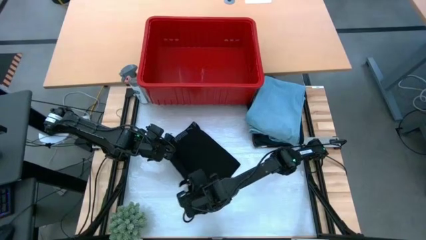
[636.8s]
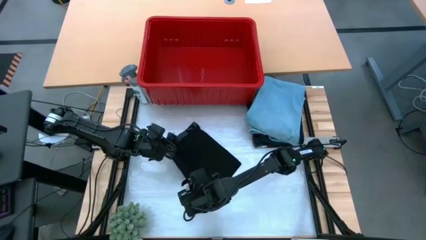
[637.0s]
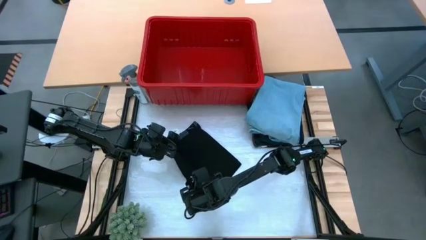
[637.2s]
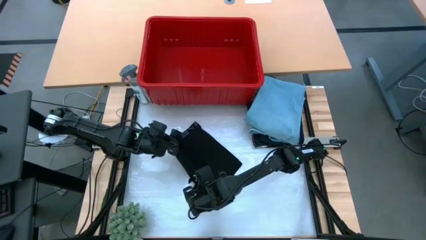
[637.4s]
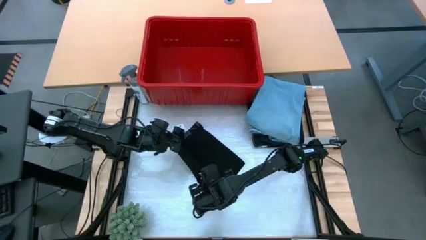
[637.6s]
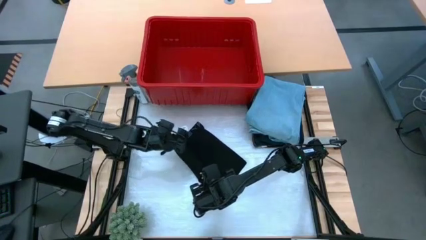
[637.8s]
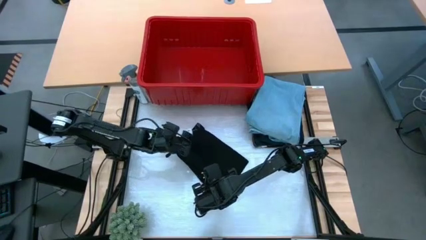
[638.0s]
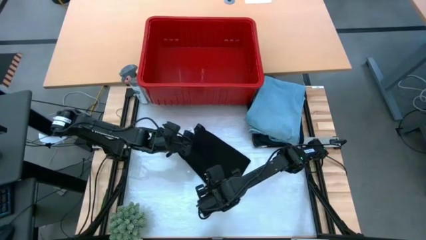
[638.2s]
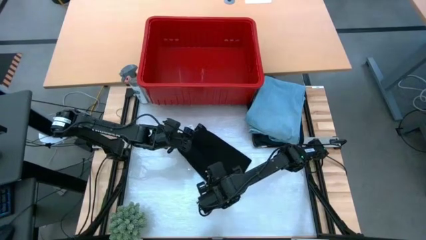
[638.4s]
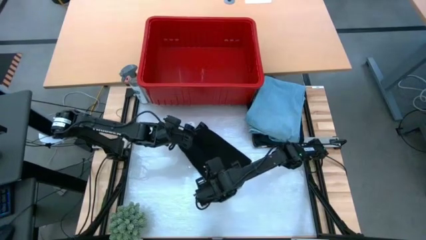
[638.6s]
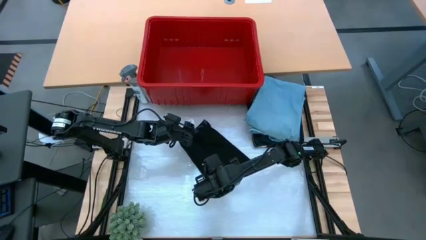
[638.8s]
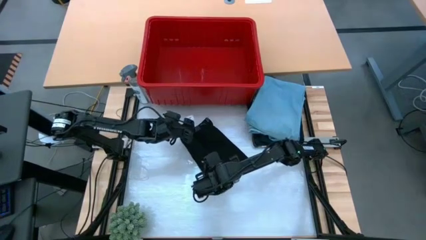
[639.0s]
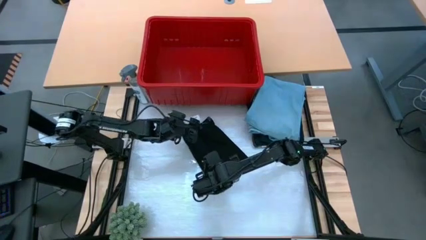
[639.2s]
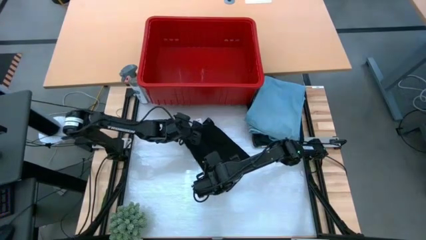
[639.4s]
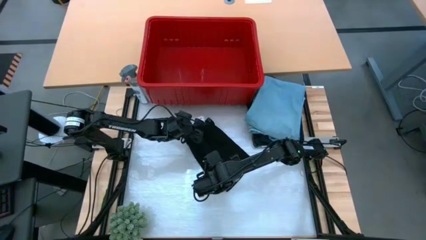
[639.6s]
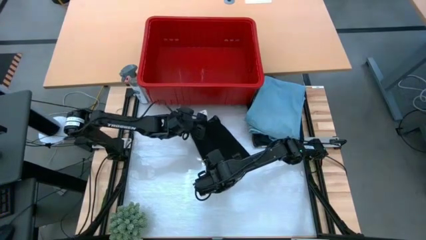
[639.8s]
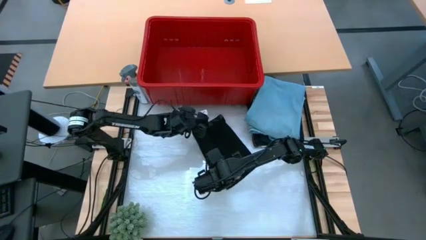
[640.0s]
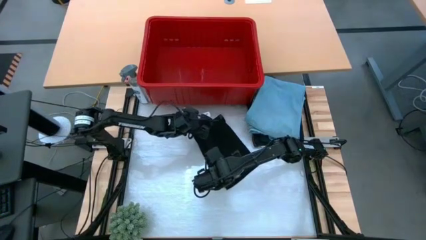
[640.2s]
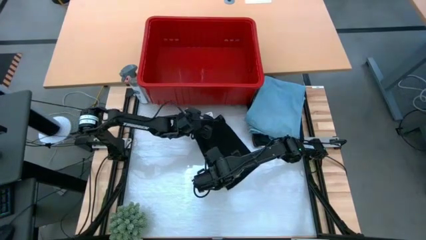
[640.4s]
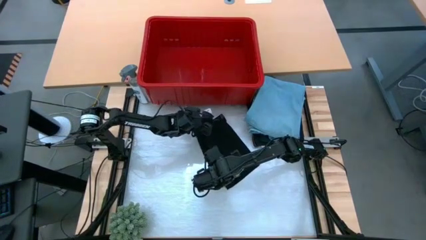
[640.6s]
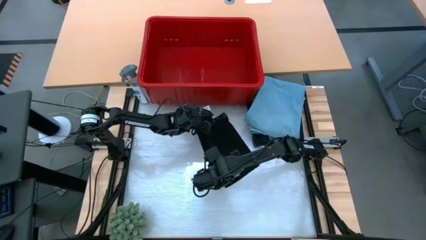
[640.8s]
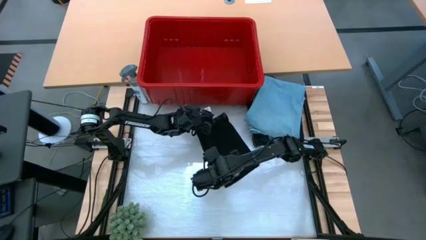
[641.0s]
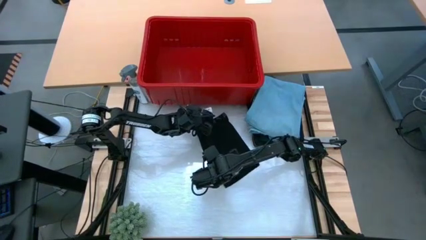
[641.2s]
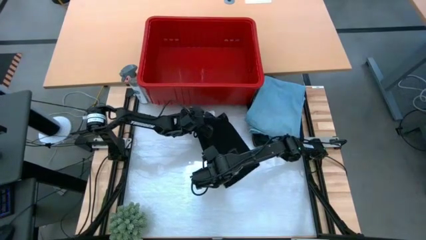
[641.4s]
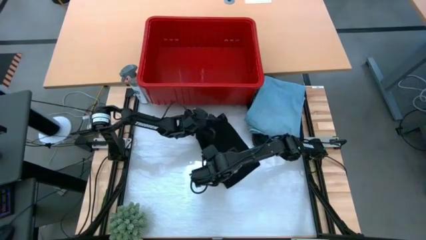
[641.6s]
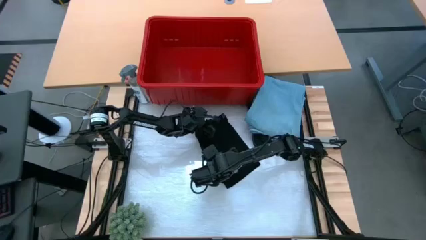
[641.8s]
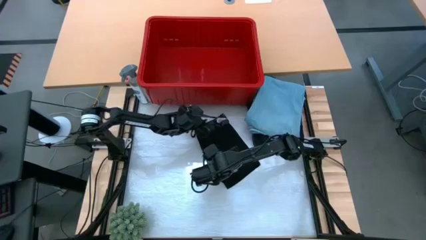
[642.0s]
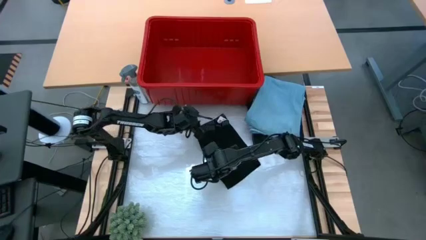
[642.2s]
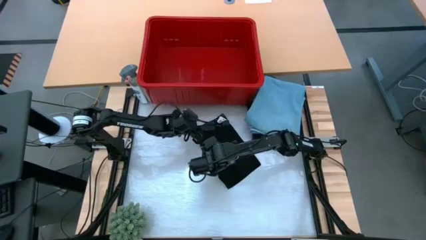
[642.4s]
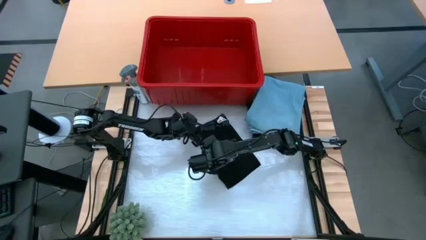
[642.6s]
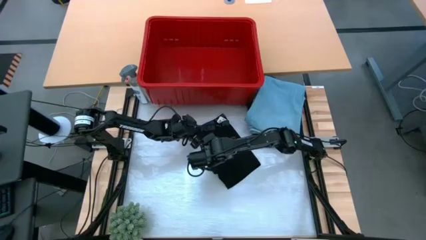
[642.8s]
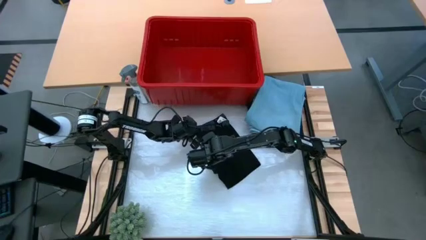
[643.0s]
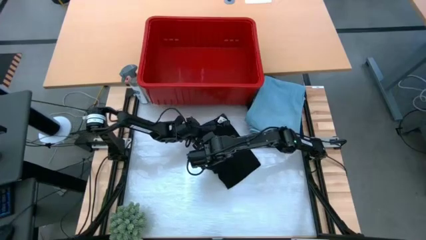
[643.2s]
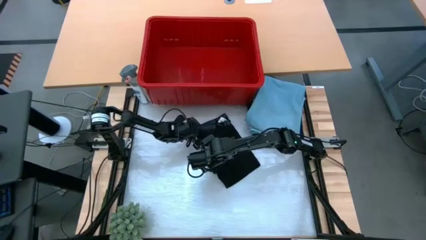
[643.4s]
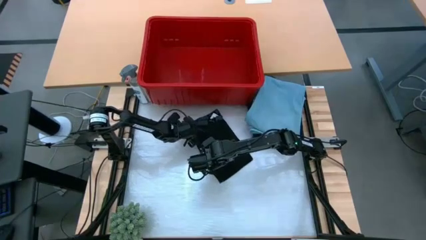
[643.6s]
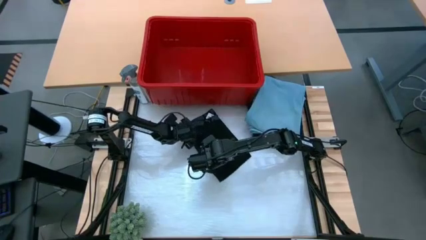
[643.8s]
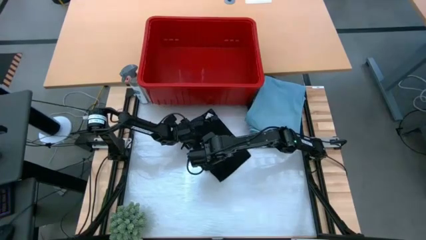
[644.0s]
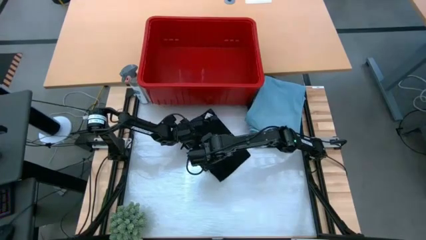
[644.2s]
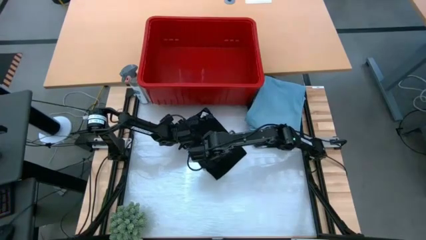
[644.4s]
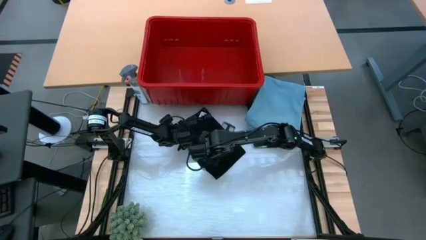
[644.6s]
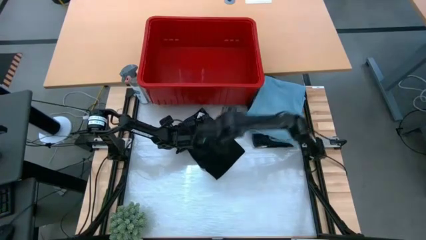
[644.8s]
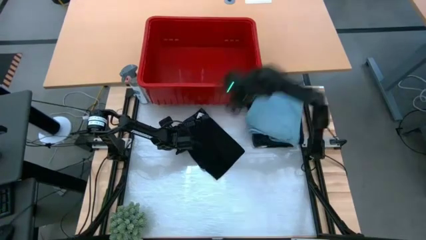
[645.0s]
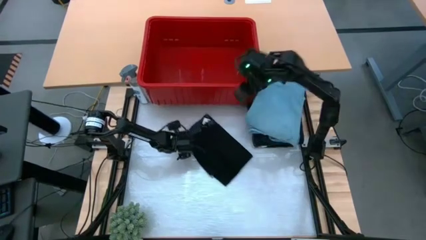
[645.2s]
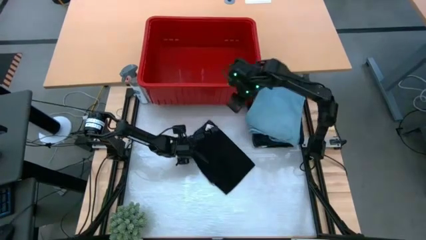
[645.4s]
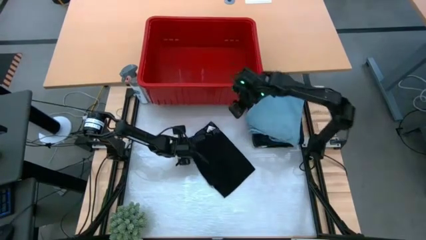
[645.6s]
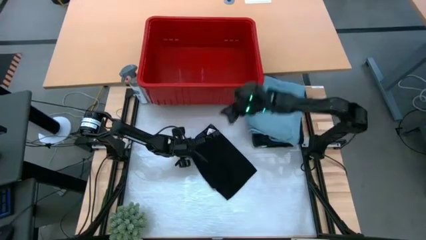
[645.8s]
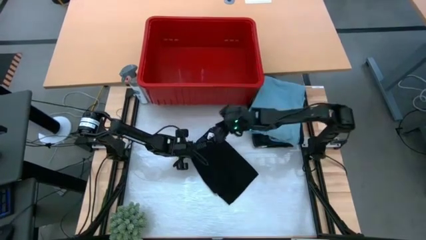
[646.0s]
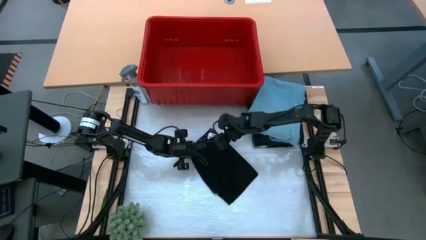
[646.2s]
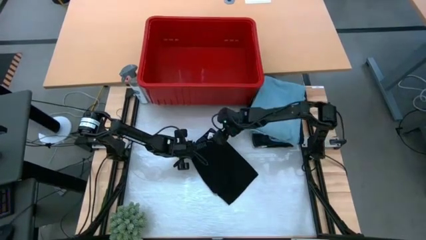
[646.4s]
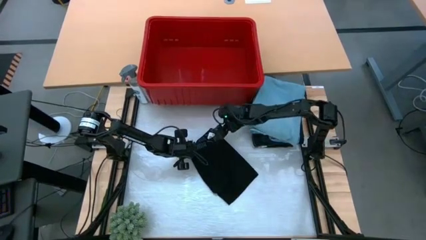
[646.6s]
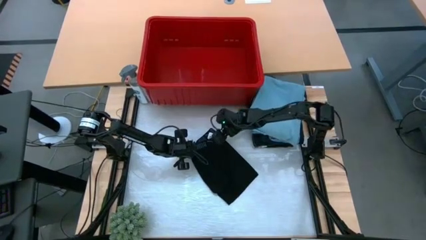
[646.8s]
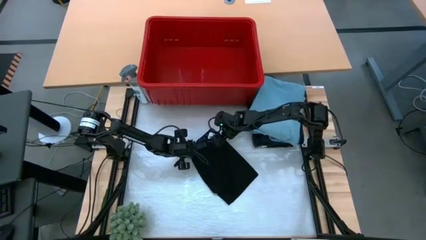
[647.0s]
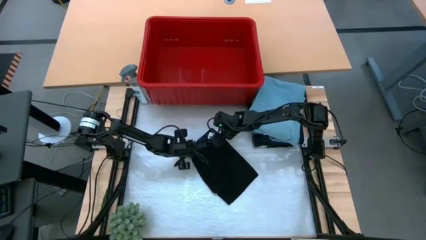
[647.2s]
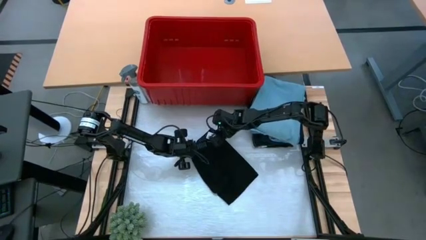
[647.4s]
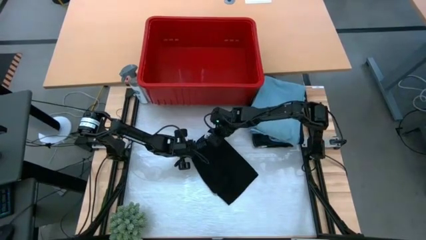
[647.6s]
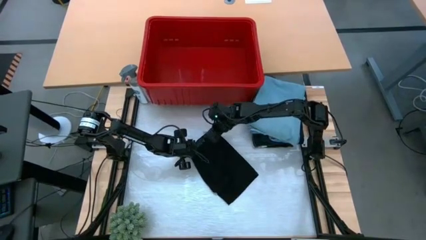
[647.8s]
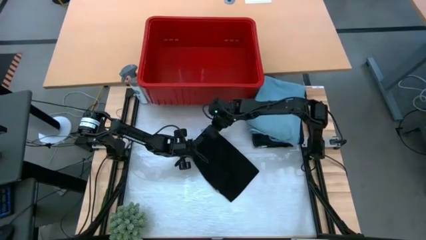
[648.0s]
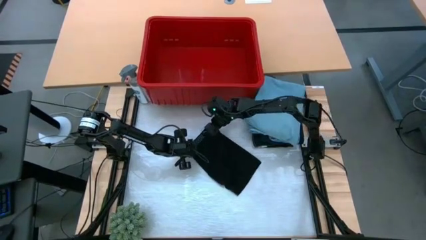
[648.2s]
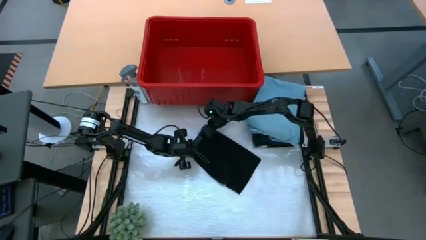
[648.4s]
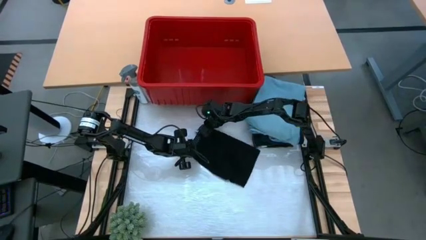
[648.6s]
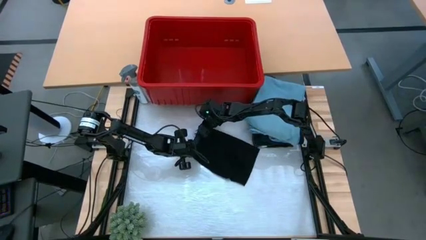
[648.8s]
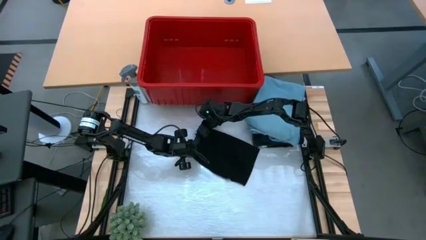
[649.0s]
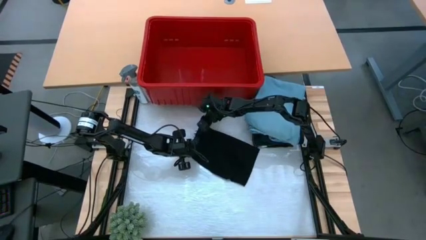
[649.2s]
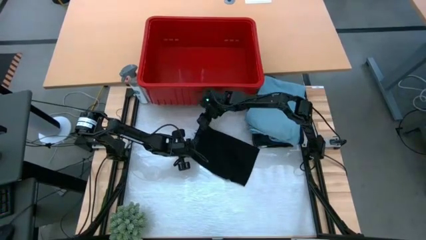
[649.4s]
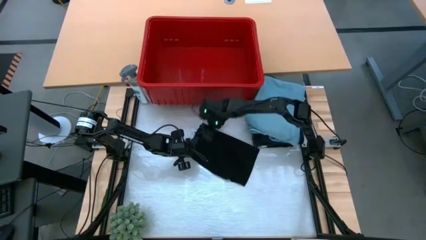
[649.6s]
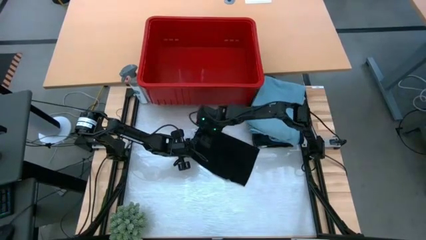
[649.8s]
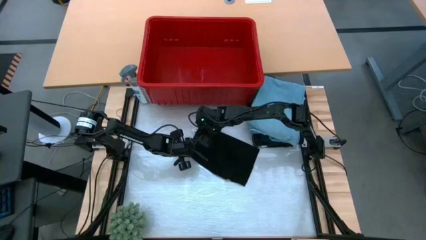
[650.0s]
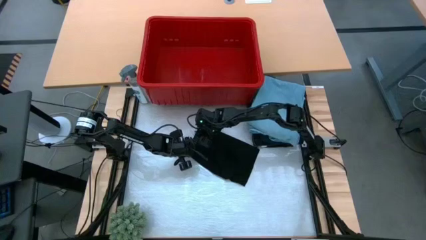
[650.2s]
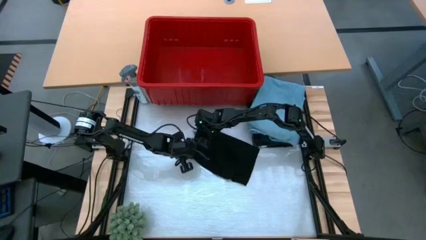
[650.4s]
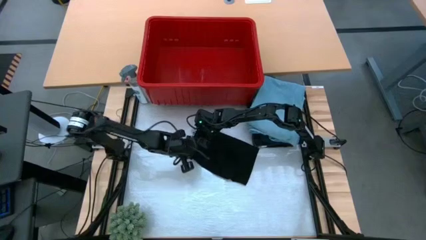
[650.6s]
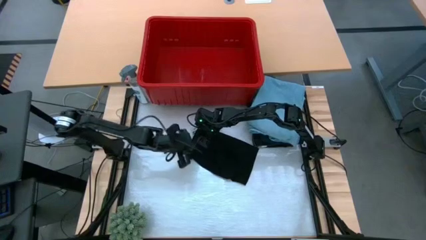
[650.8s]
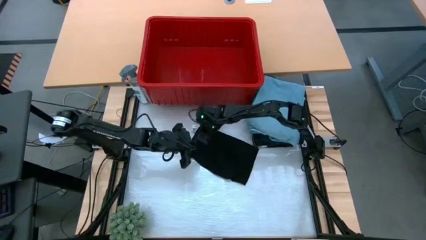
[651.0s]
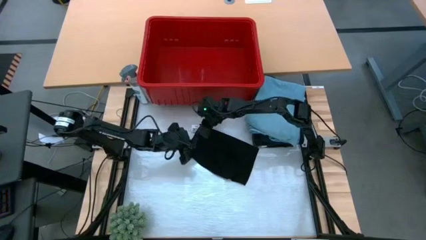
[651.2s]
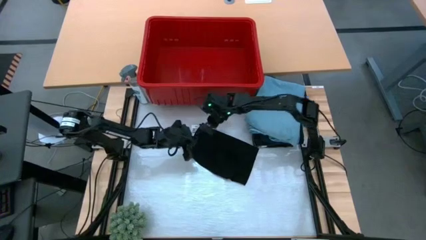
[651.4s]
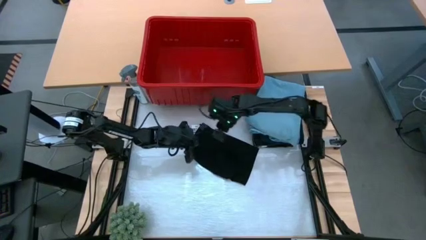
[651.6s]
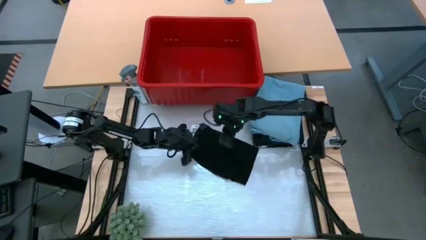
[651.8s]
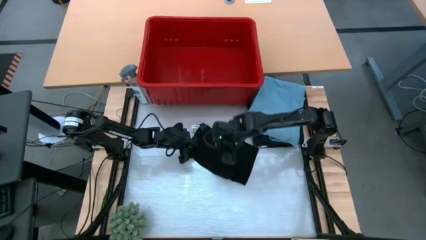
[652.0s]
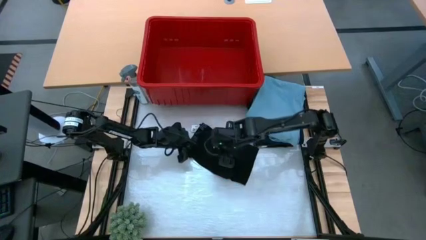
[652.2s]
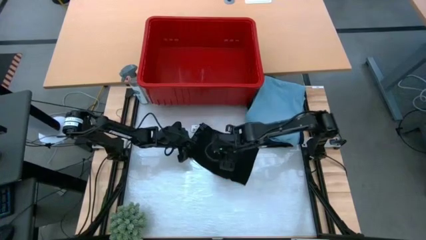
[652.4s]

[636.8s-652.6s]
Task: Fold Laundry from Bin
Fold the black boxer short
